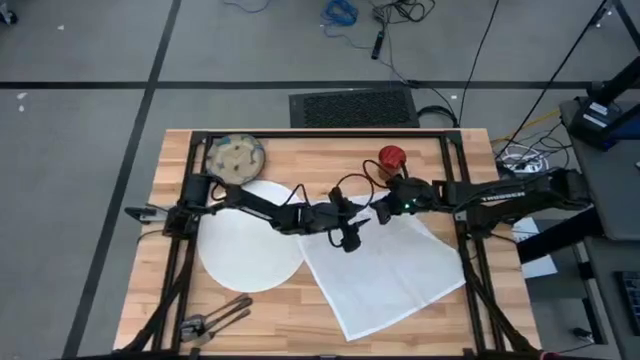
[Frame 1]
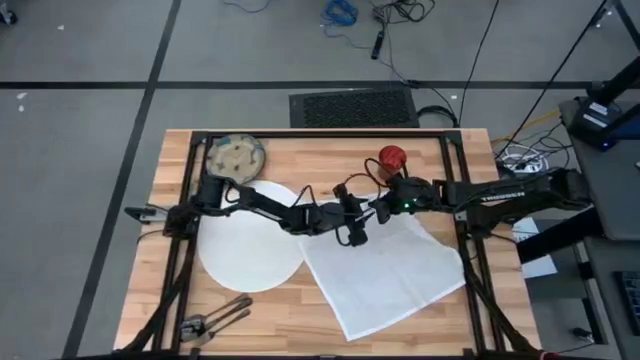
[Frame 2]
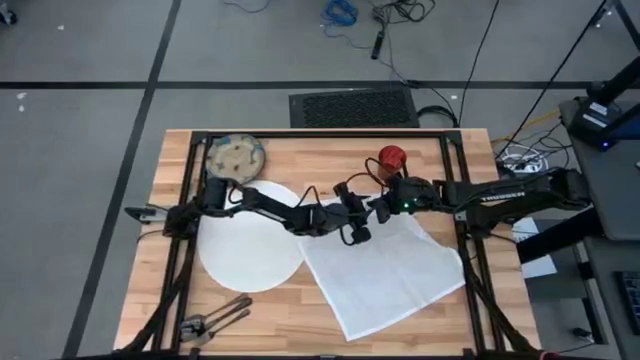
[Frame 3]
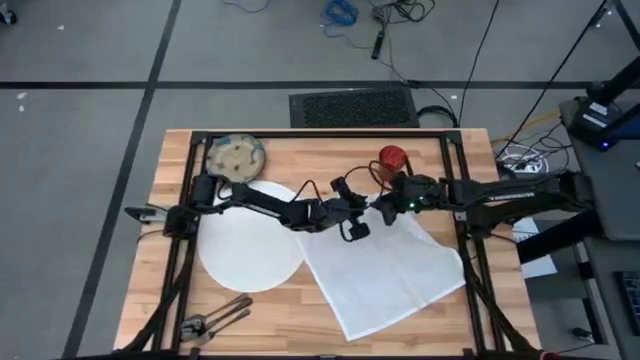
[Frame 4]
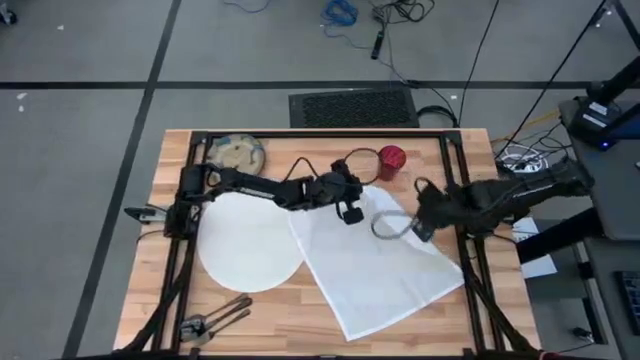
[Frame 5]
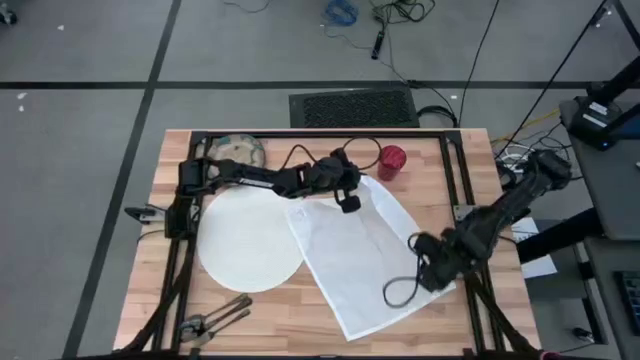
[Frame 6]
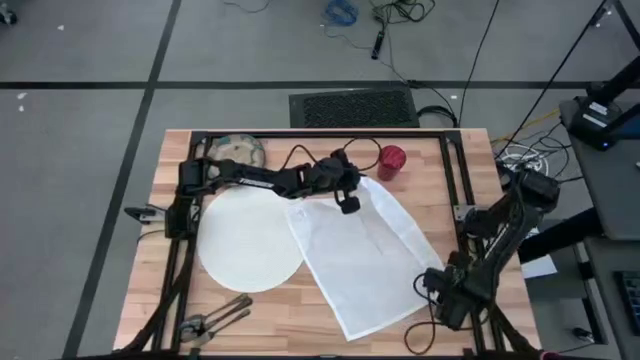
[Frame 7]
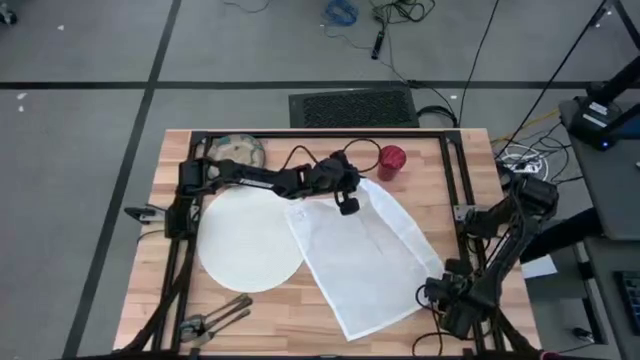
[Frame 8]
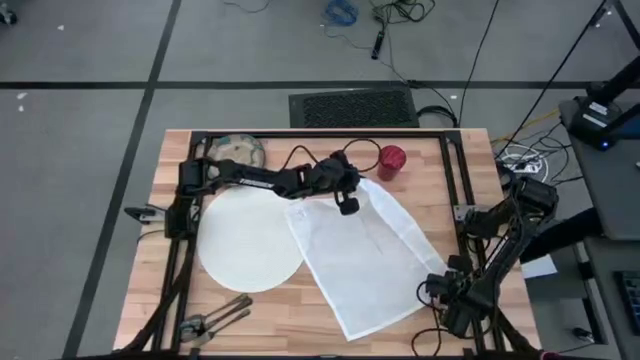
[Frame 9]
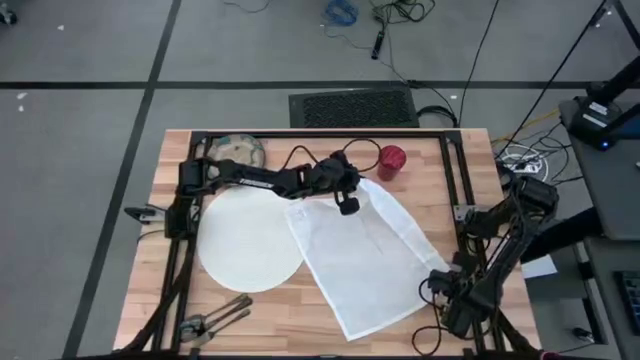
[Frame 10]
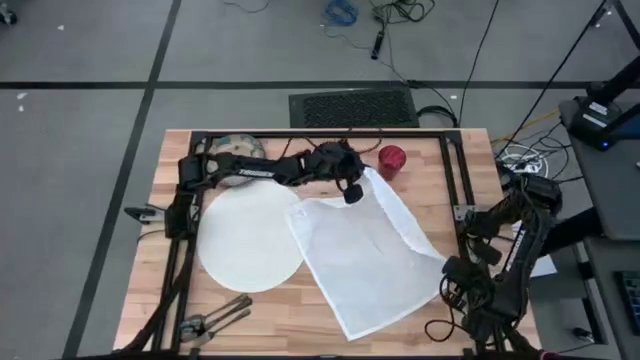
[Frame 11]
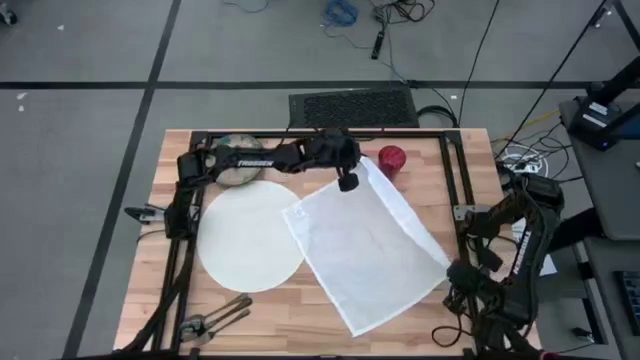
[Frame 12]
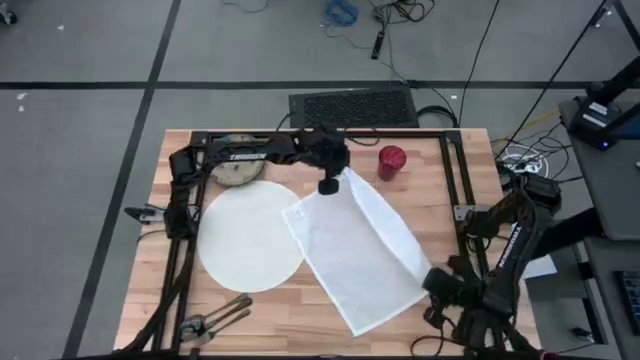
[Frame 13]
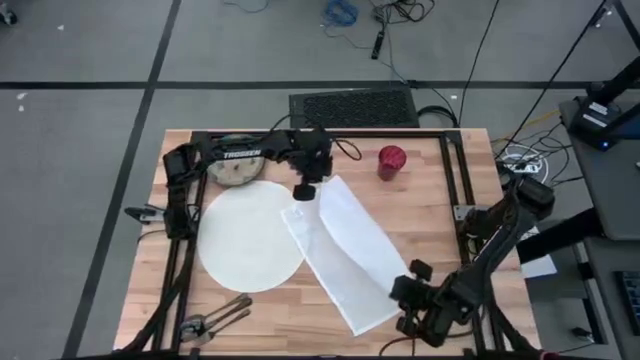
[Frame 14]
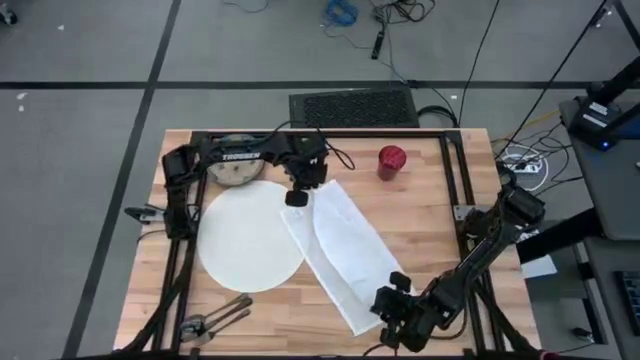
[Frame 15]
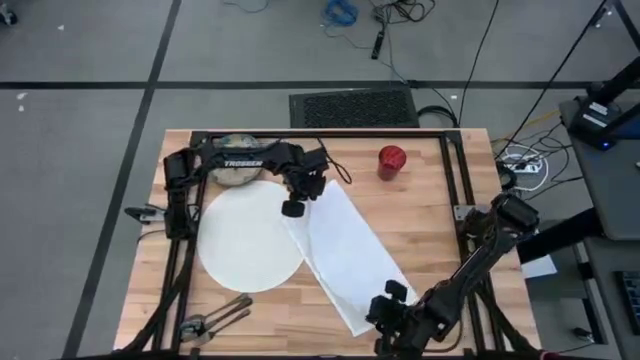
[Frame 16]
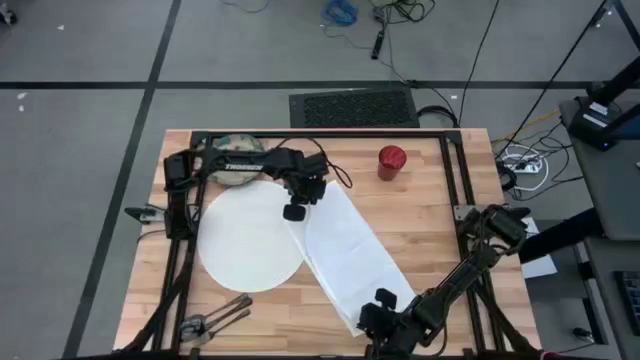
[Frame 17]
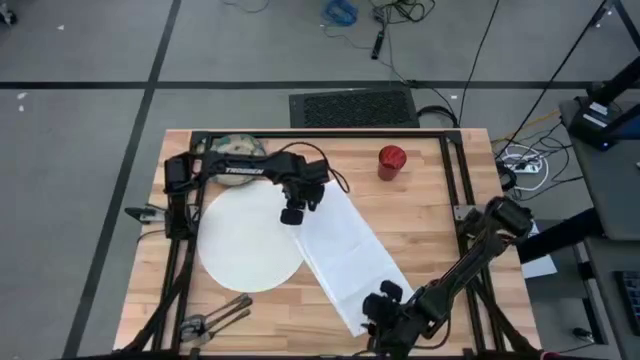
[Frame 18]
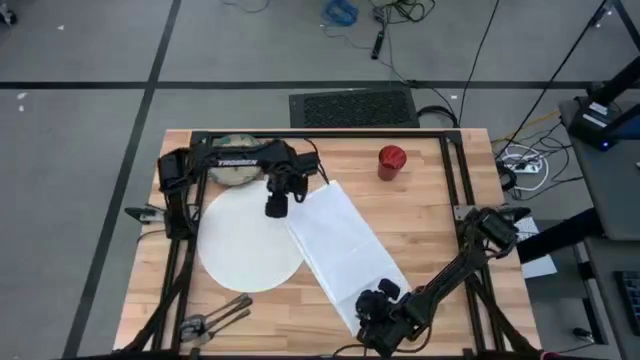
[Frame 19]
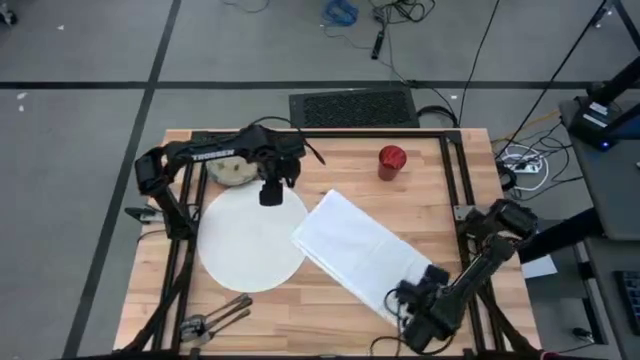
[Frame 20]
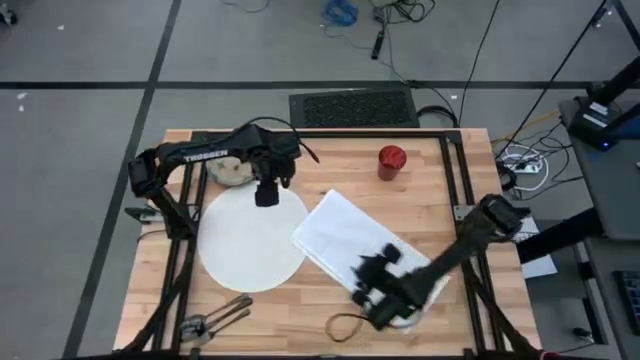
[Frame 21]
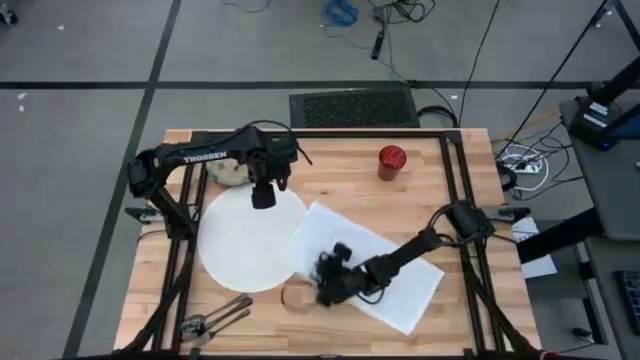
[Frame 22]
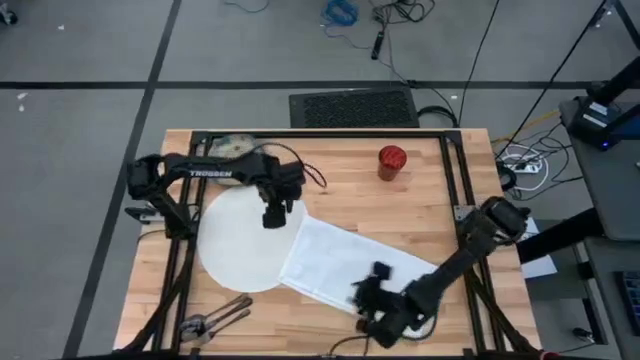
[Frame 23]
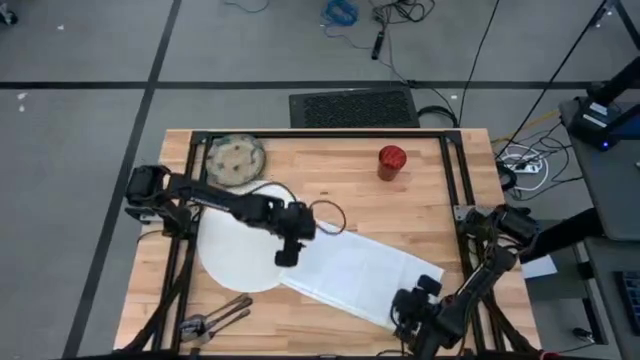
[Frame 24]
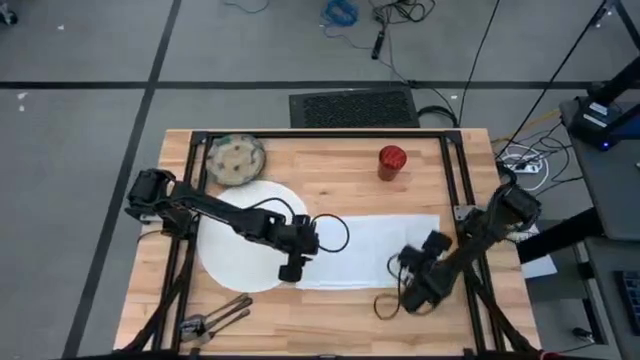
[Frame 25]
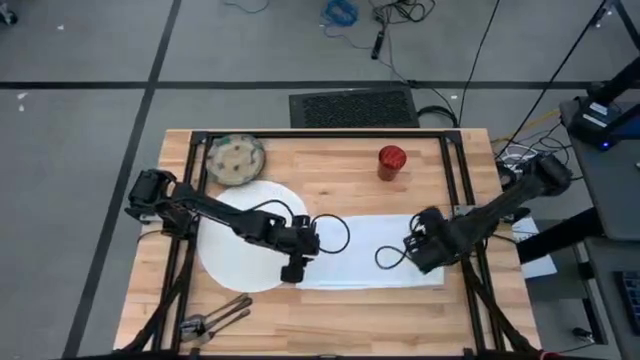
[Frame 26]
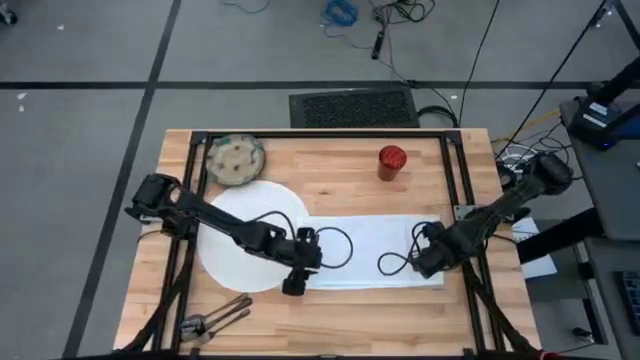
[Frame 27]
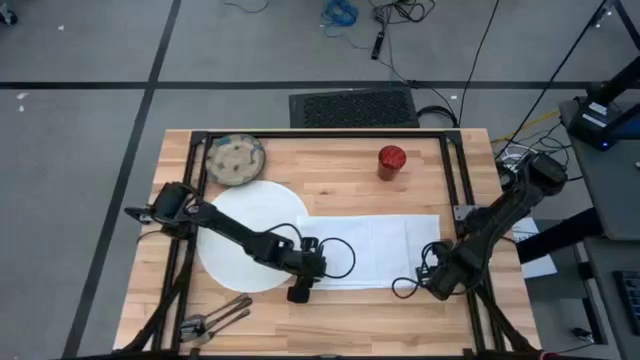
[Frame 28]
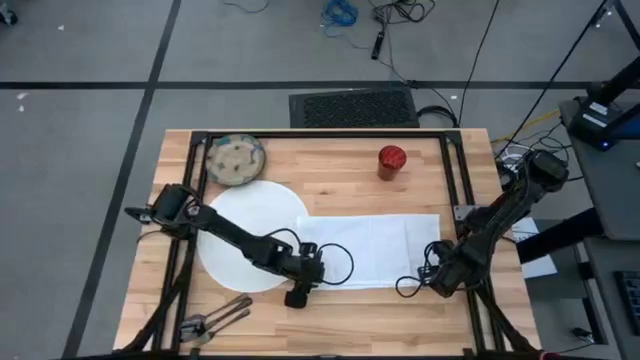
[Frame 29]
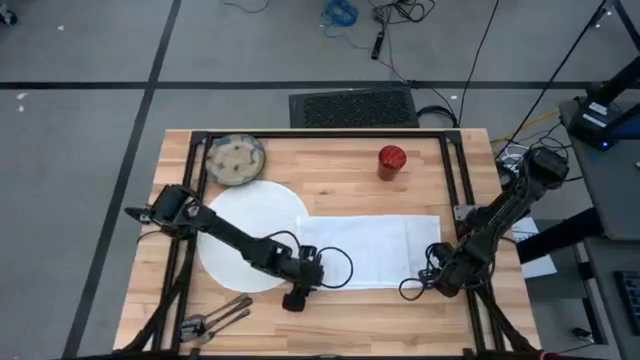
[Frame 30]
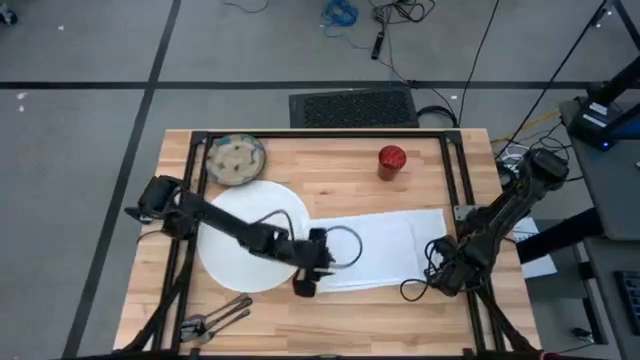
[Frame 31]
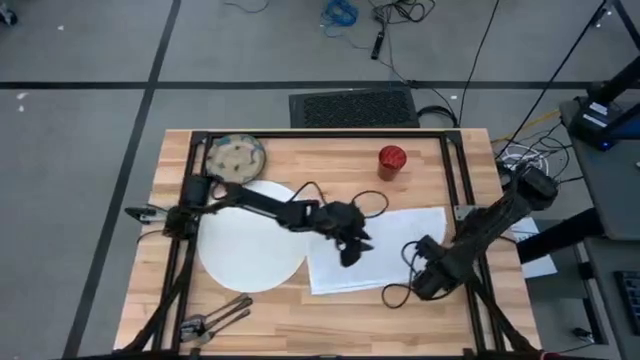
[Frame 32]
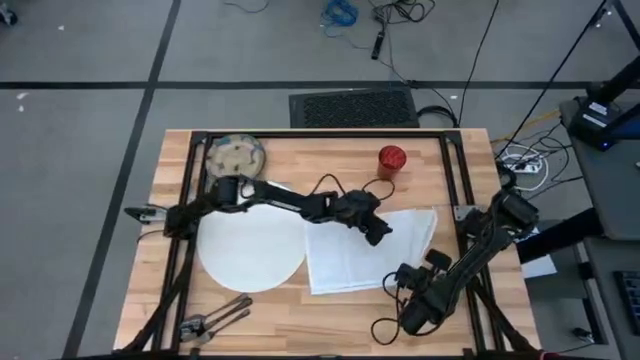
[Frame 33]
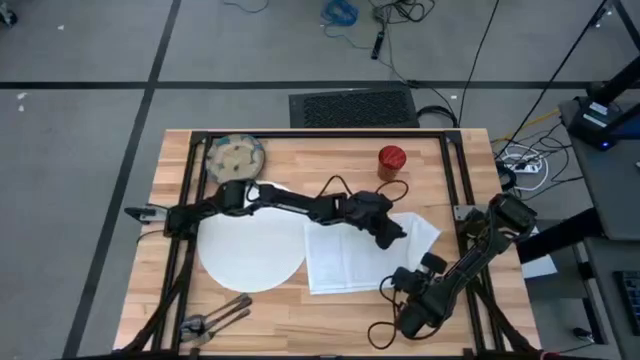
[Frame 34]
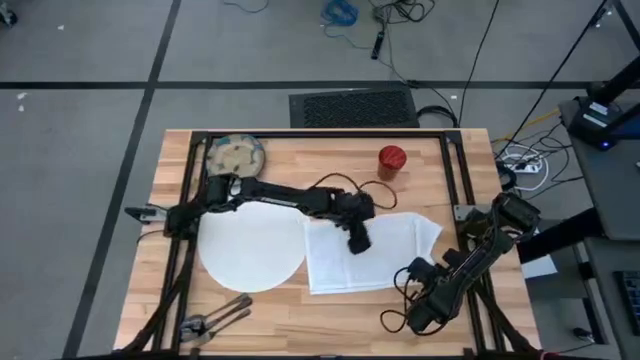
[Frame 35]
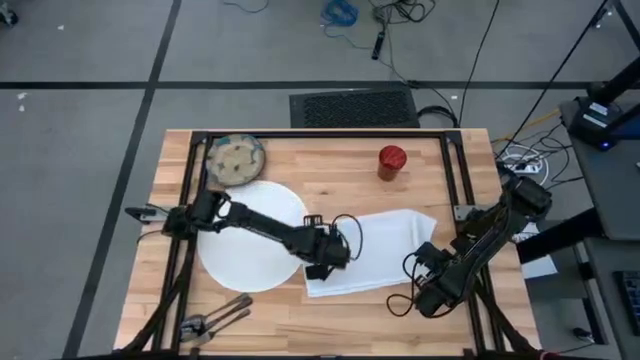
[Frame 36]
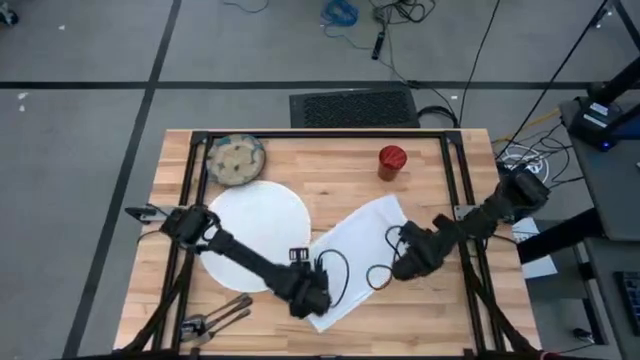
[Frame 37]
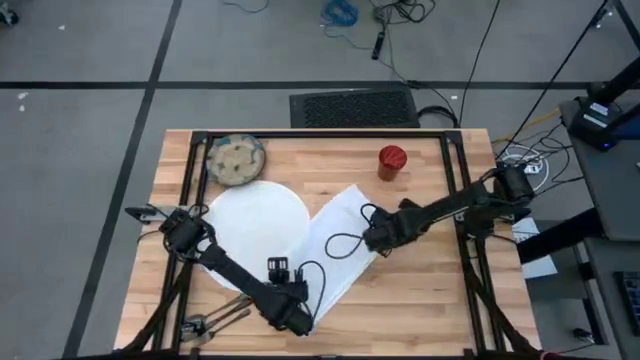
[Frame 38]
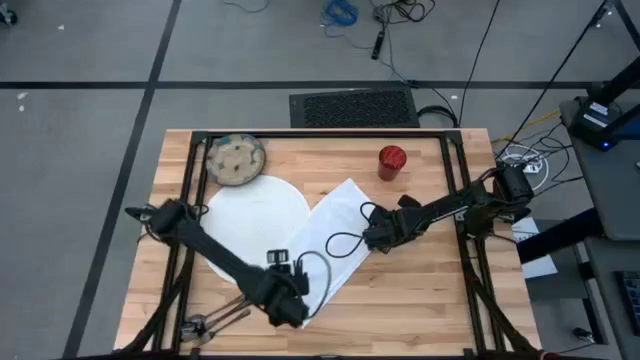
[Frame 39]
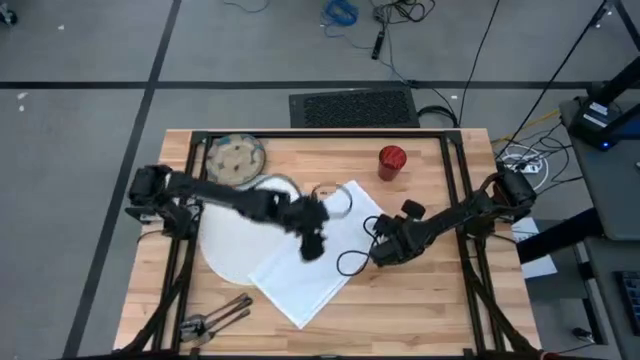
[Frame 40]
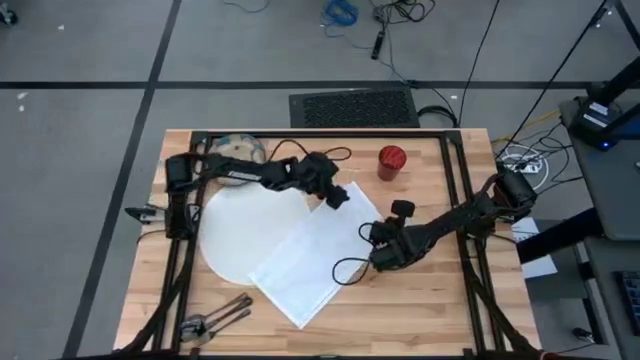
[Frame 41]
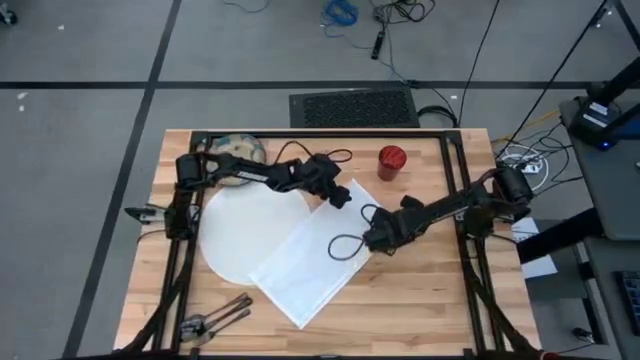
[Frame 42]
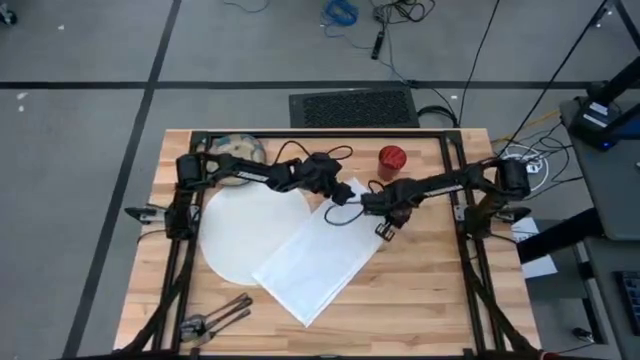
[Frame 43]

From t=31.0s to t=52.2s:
Task: Set table place
Fold the white napkin
